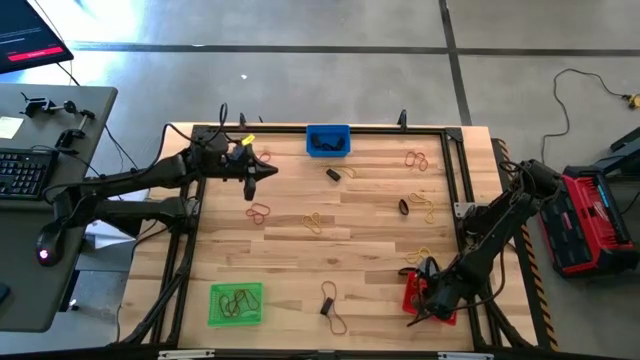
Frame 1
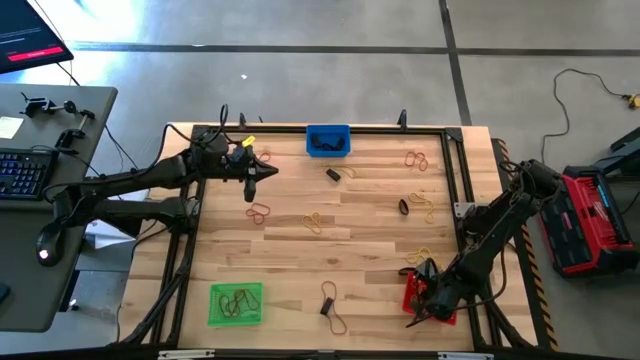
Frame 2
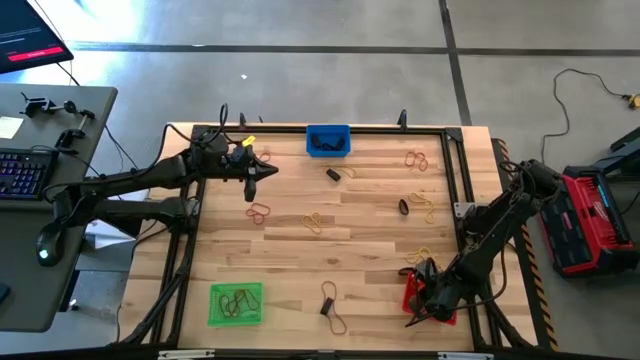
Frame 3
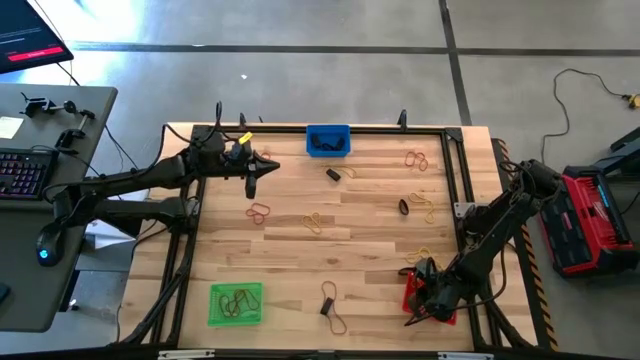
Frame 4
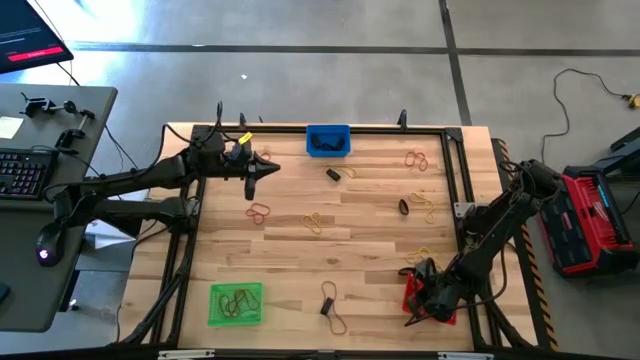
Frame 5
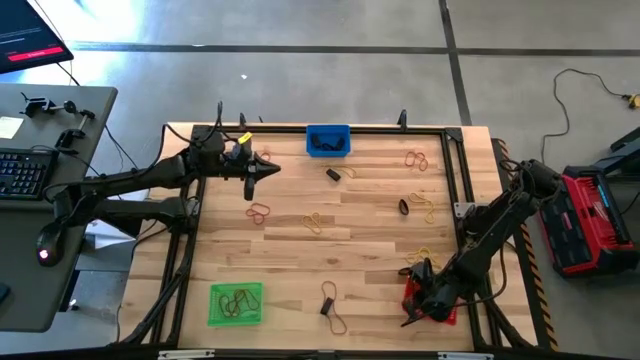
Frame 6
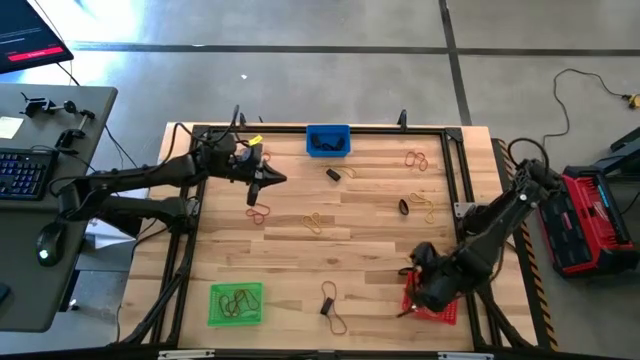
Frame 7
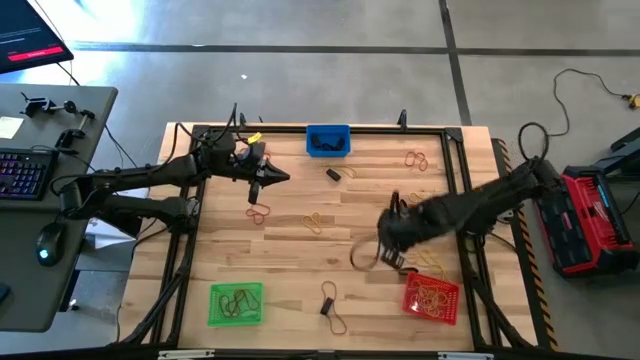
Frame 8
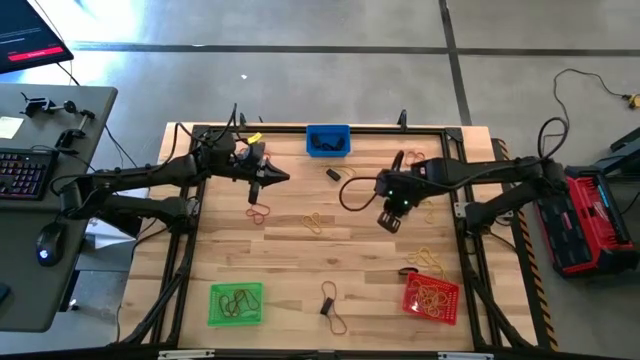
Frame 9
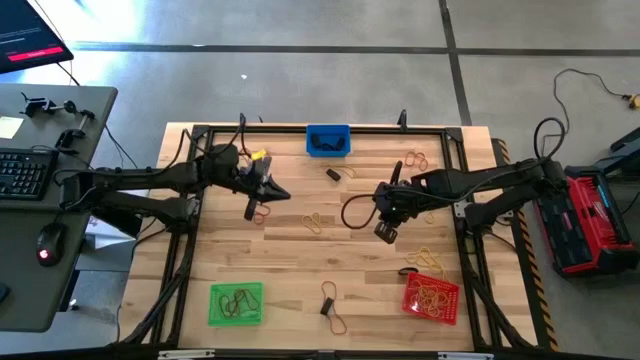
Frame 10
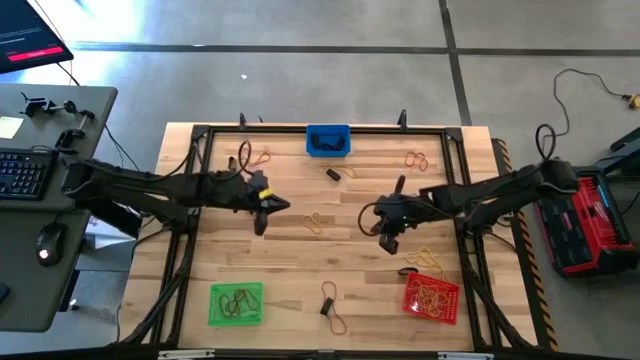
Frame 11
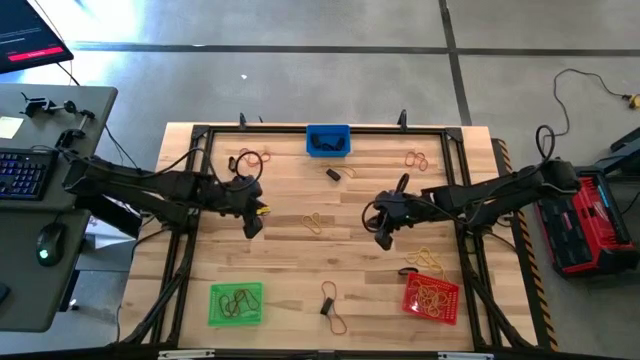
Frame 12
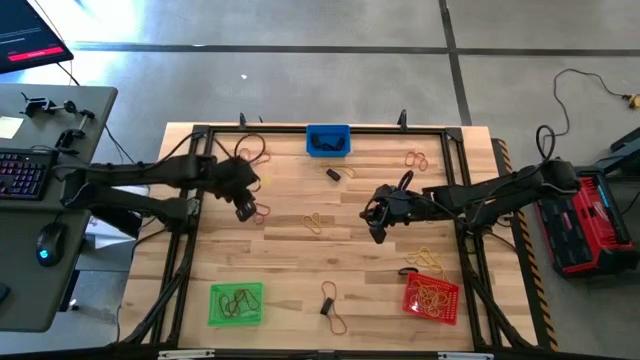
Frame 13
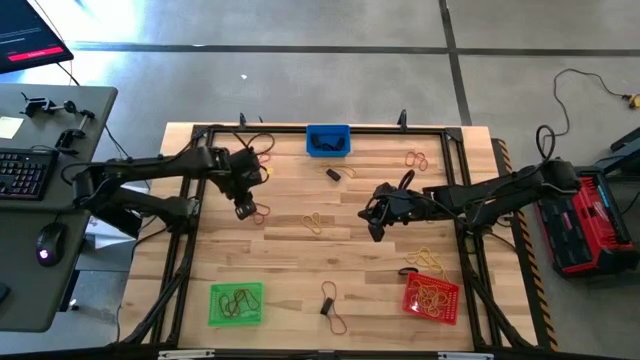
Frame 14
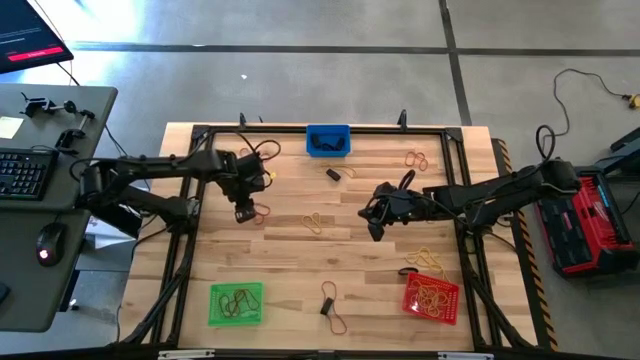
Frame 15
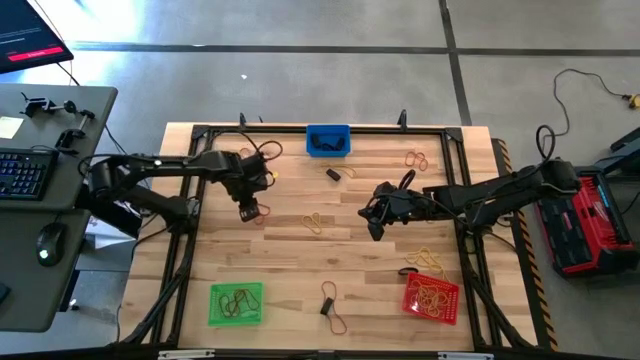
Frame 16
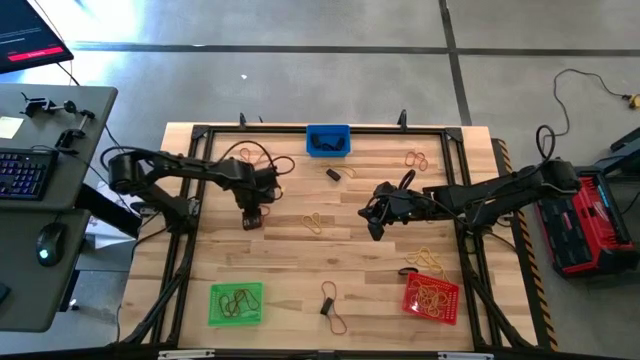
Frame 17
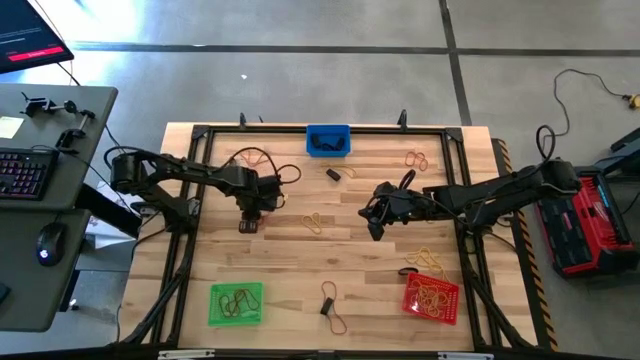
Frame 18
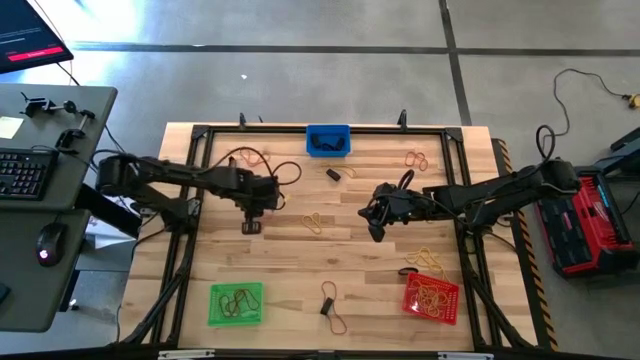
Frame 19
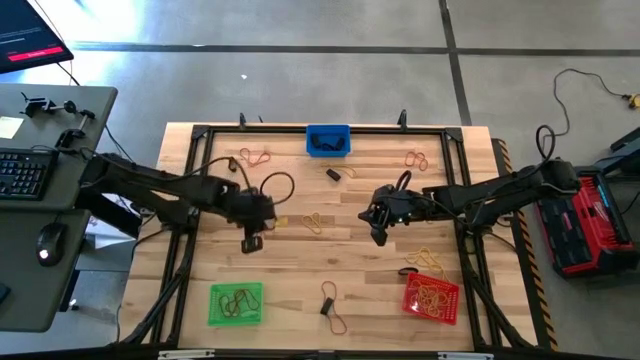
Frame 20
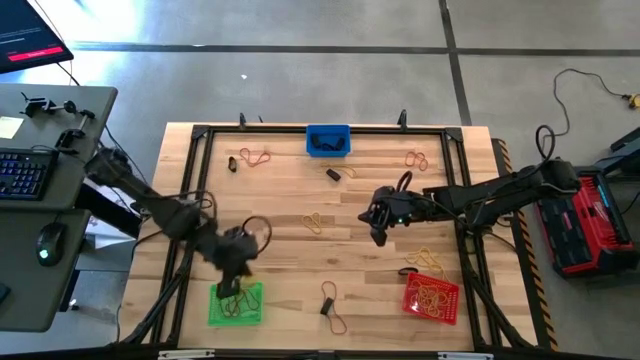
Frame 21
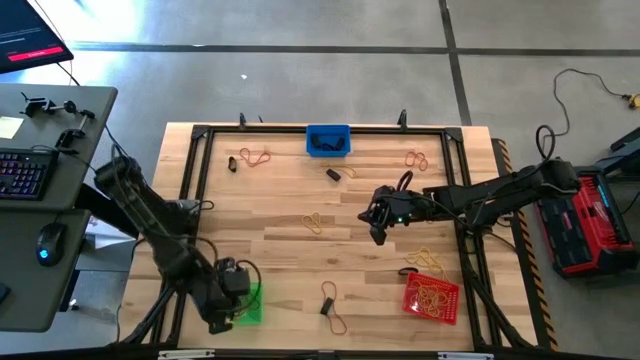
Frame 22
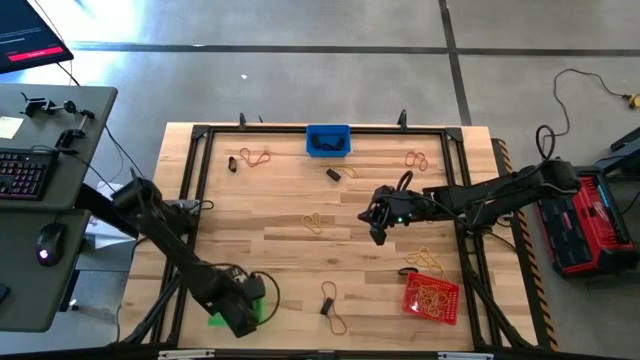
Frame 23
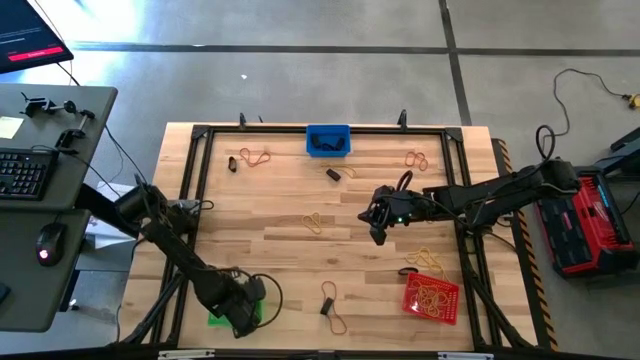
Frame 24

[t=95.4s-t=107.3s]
Task: Sort rubber bands into baskets
Put the red rubber band into the green basket

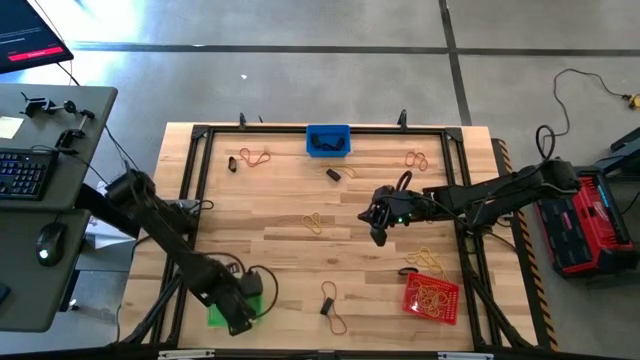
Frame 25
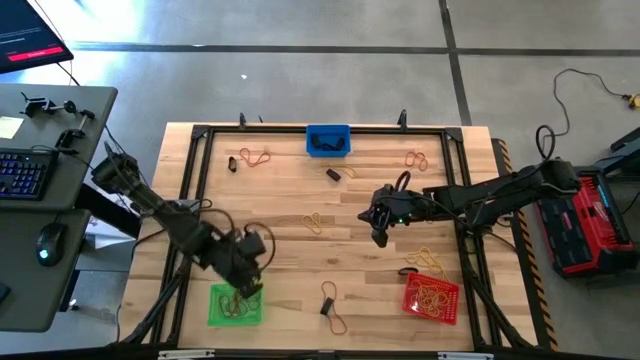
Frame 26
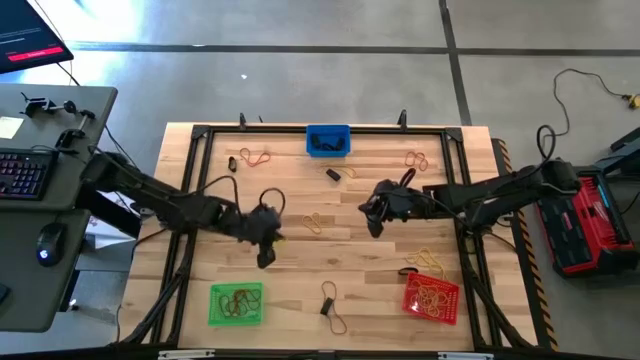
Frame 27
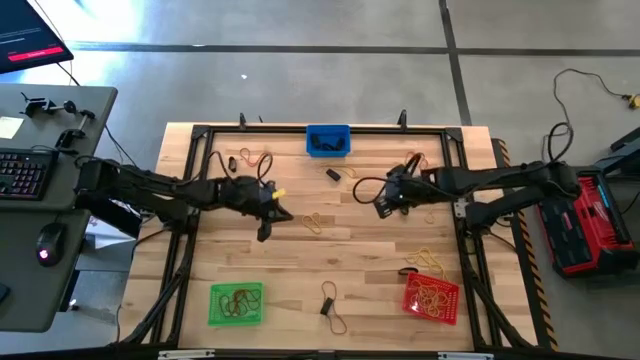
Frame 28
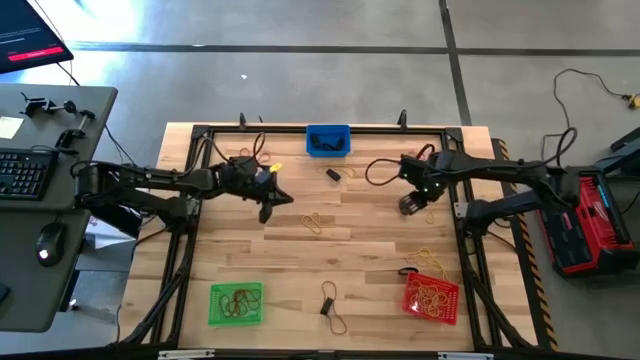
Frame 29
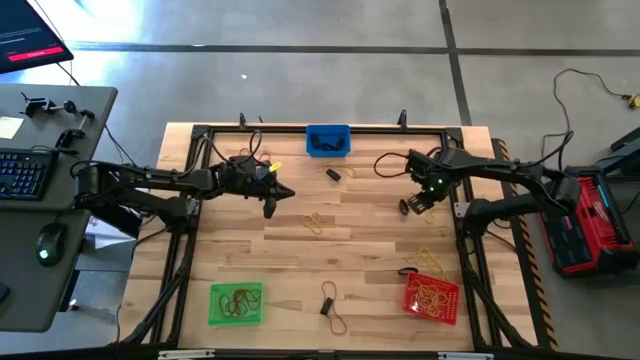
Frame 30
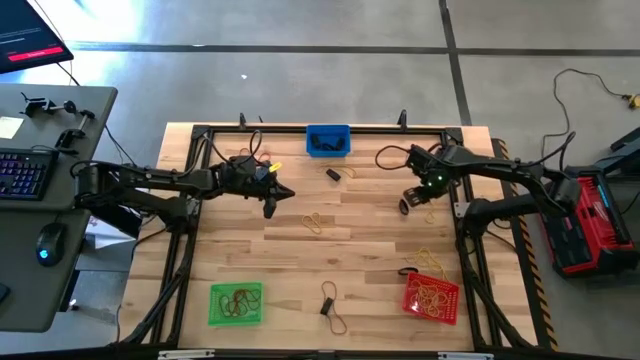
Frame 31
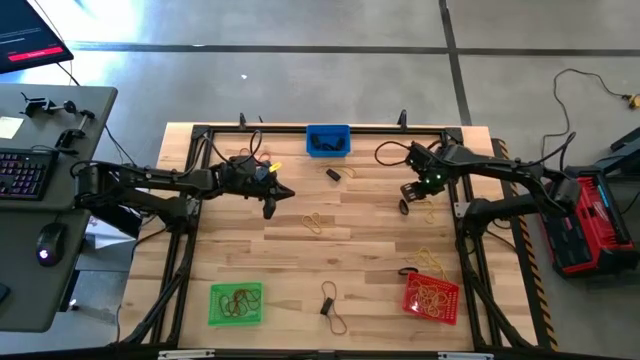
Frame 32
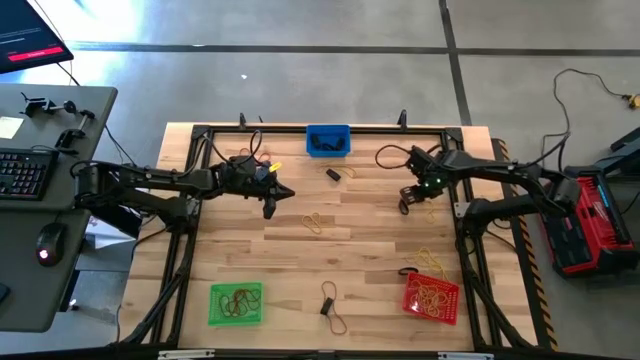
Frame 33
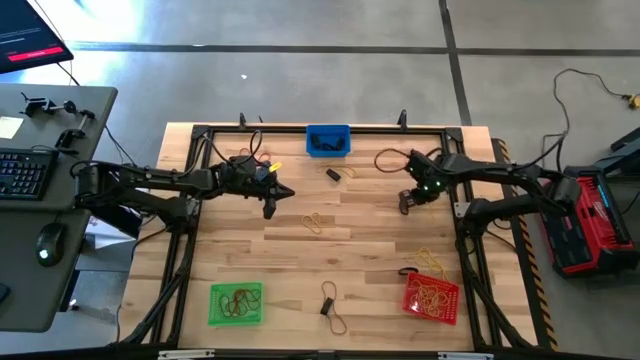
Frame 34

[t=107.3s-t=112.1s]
Put the yellow rubber band into the red basket

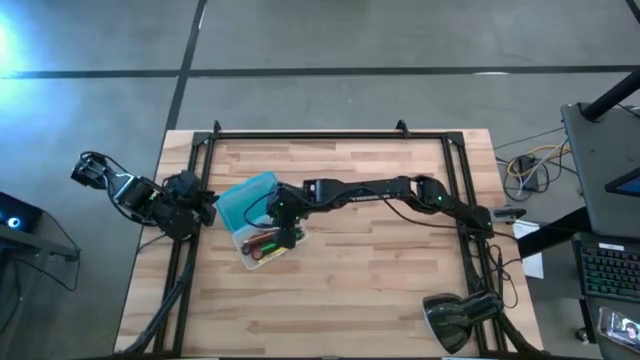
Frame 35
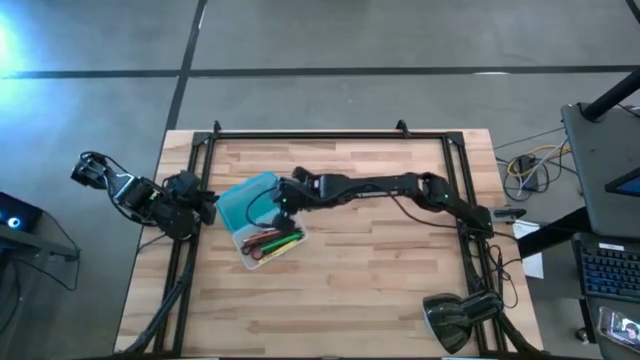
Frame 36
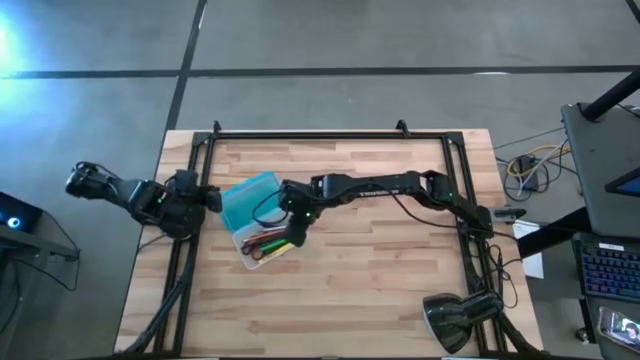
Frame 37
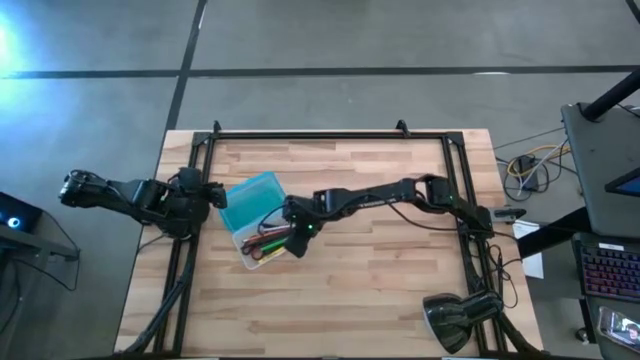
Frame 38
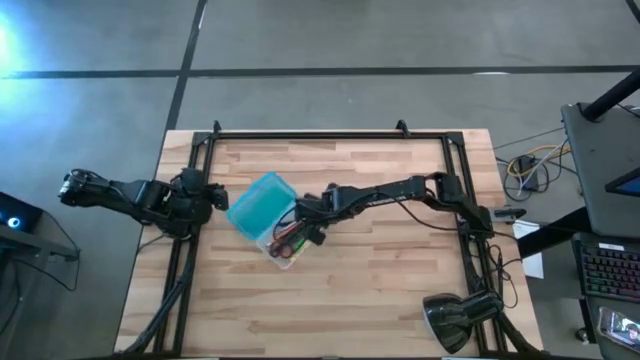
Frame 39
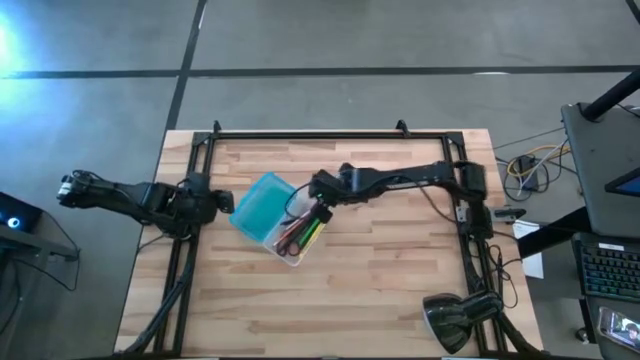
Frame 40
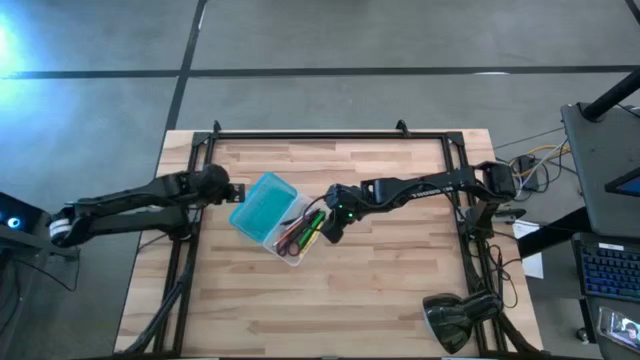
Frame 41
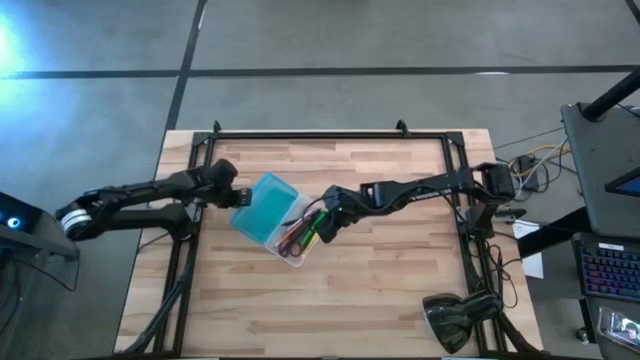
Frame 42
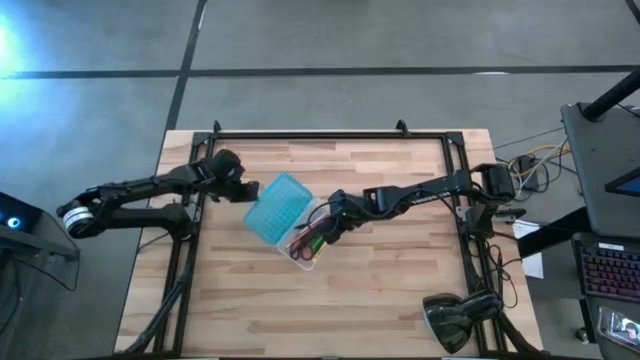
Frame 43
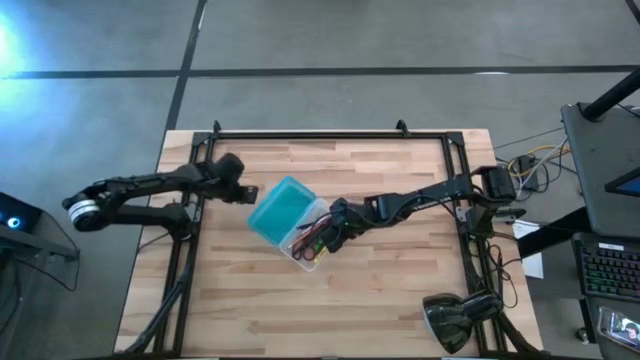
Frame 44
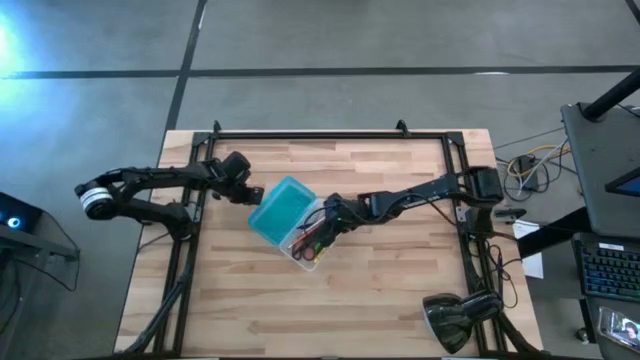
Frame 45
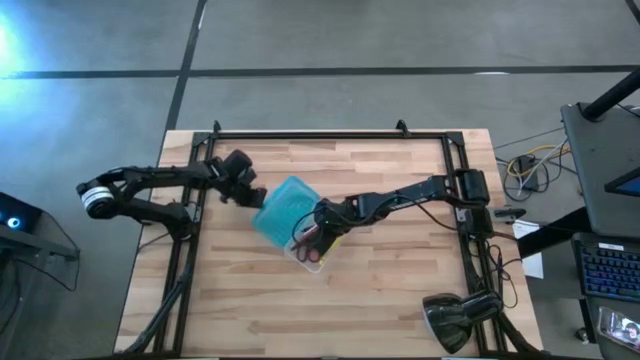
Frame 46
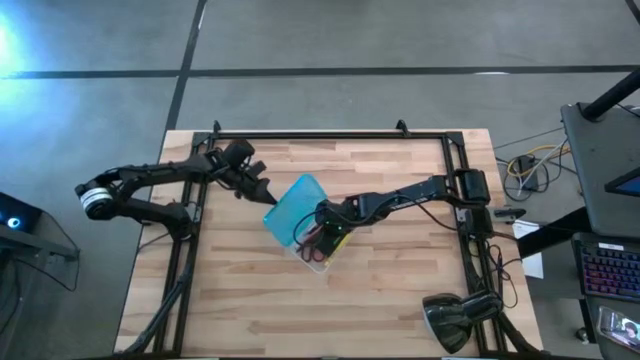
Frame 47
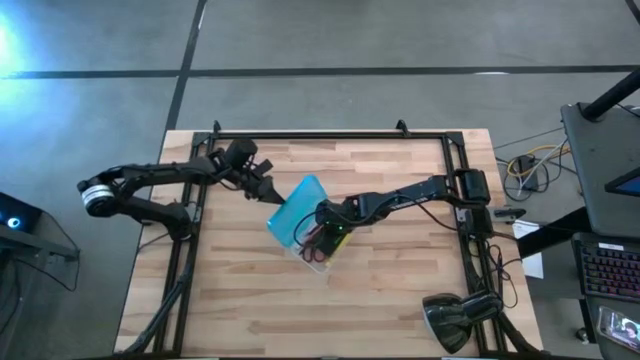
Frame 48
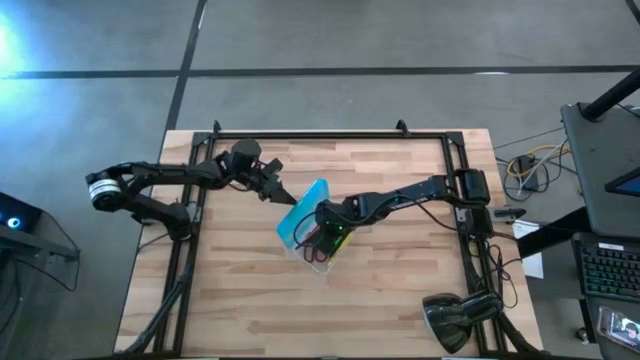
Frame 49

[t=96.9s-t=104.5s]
Task: Pick & place school supplies into a supply box
Close the blue supply box
